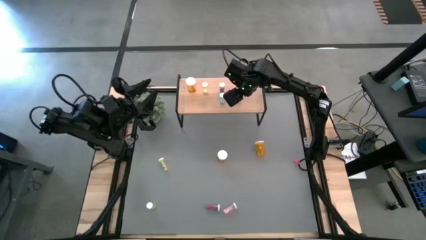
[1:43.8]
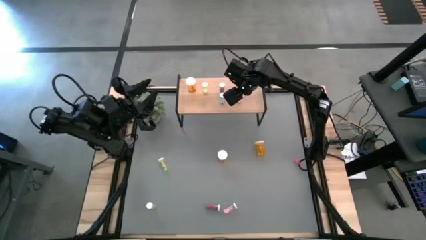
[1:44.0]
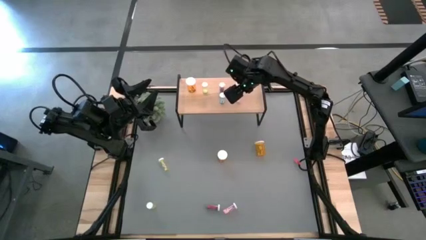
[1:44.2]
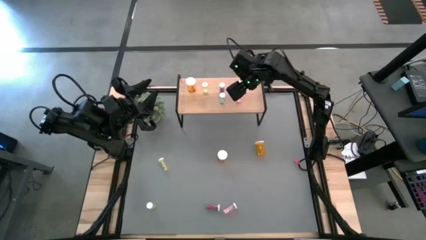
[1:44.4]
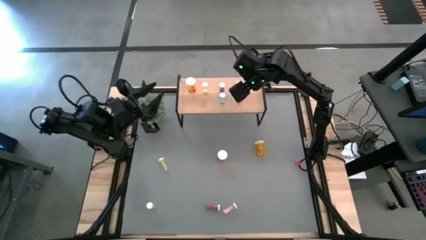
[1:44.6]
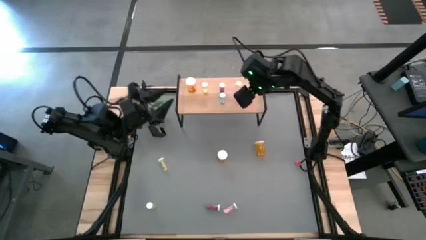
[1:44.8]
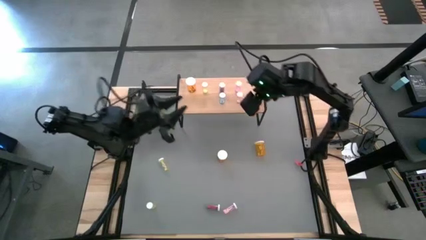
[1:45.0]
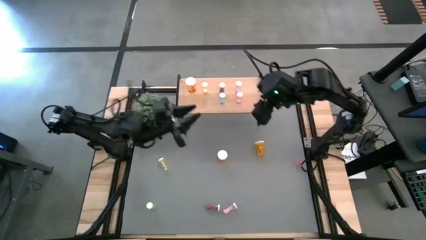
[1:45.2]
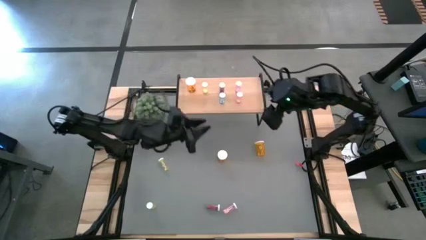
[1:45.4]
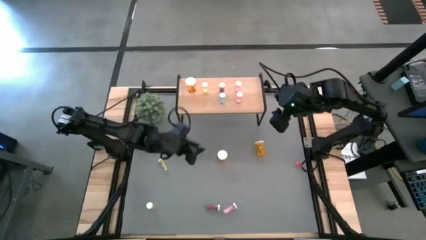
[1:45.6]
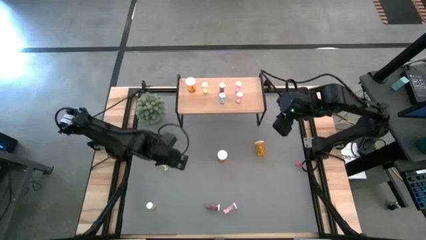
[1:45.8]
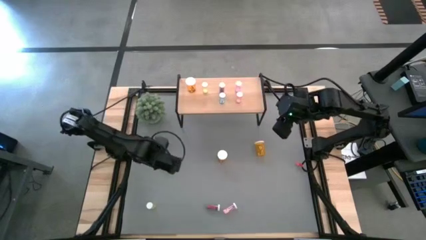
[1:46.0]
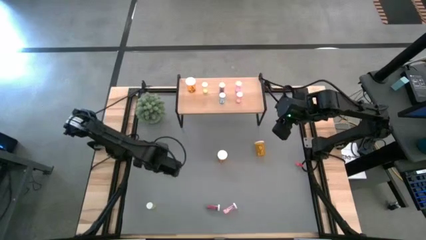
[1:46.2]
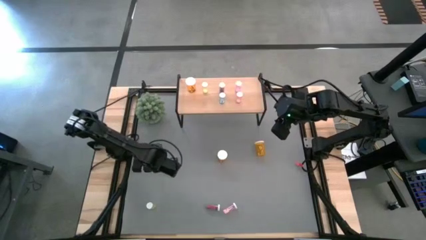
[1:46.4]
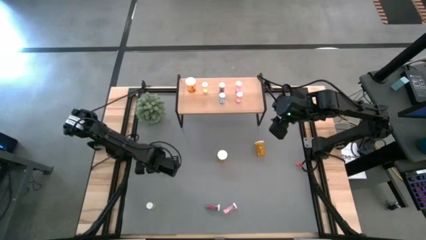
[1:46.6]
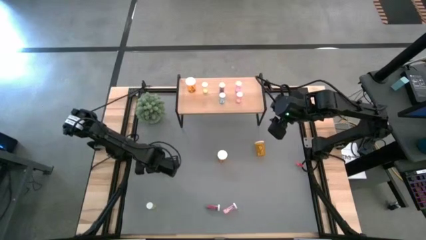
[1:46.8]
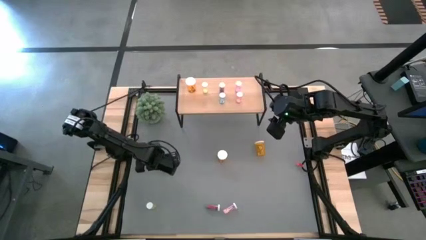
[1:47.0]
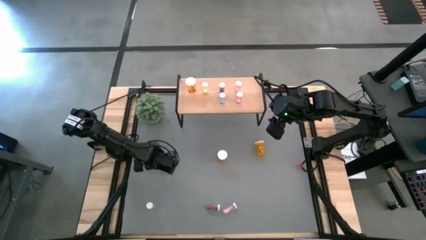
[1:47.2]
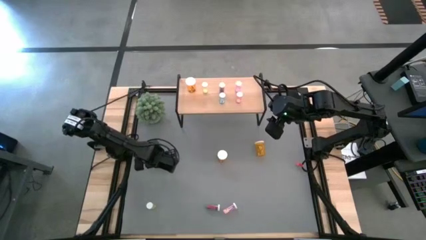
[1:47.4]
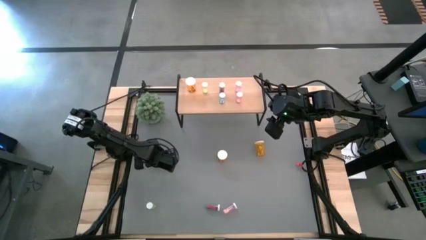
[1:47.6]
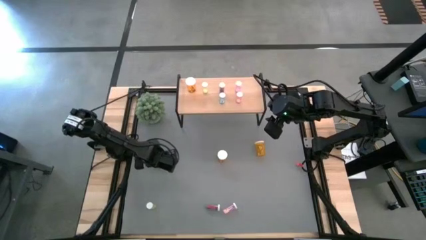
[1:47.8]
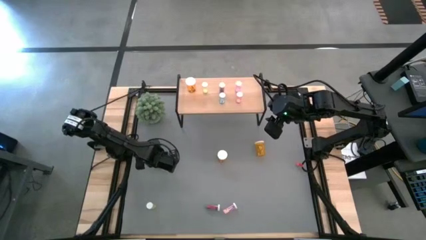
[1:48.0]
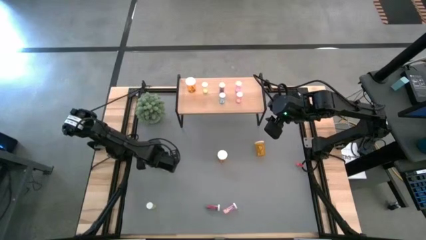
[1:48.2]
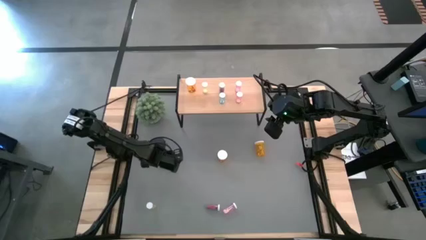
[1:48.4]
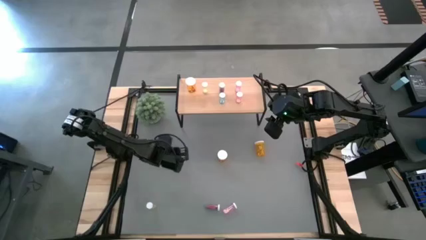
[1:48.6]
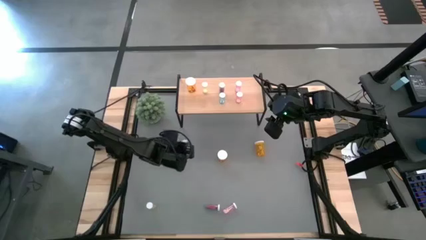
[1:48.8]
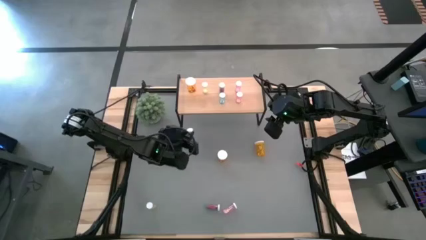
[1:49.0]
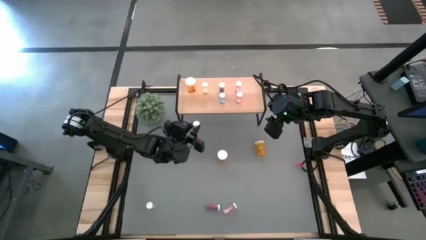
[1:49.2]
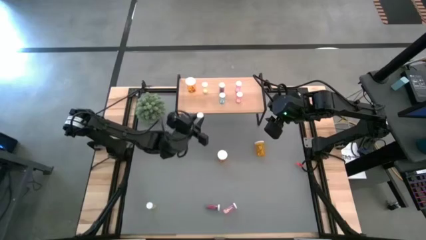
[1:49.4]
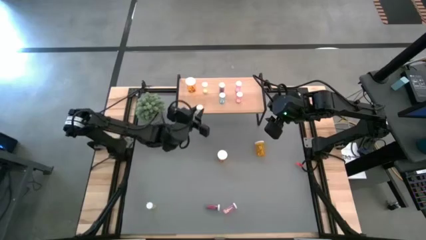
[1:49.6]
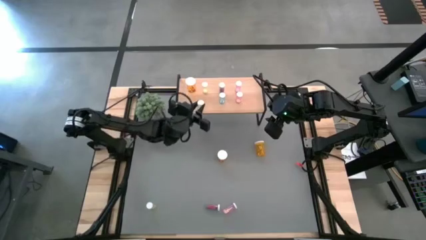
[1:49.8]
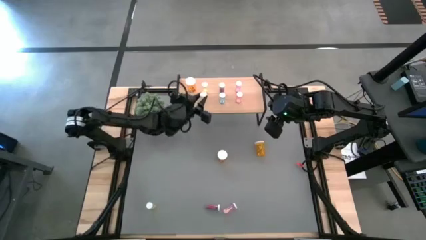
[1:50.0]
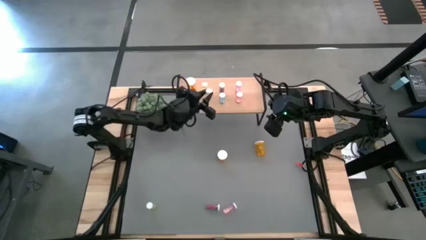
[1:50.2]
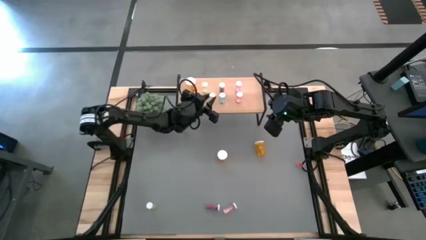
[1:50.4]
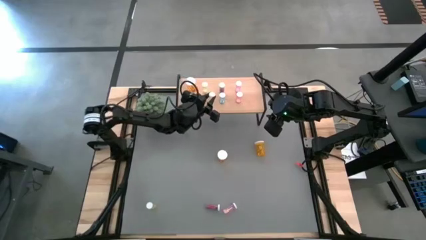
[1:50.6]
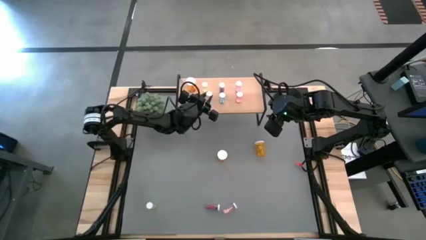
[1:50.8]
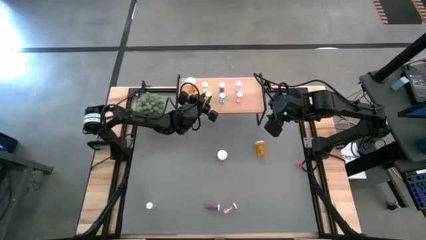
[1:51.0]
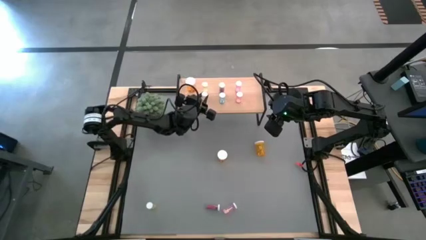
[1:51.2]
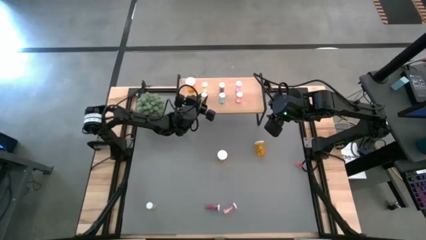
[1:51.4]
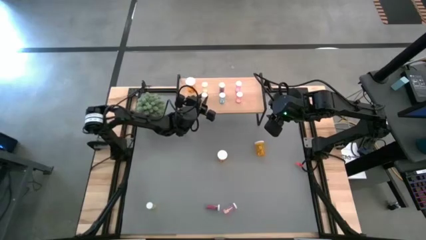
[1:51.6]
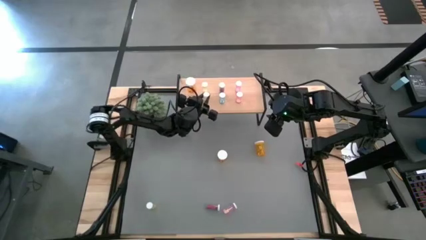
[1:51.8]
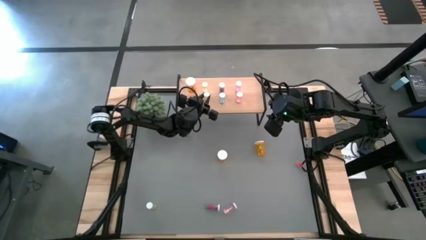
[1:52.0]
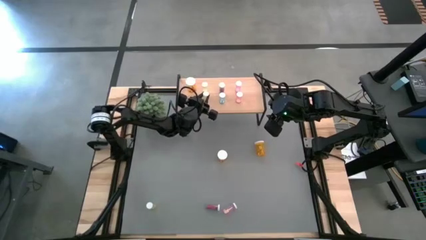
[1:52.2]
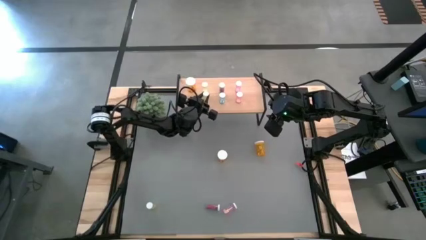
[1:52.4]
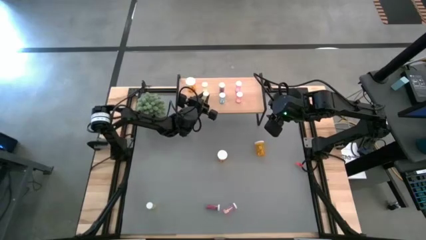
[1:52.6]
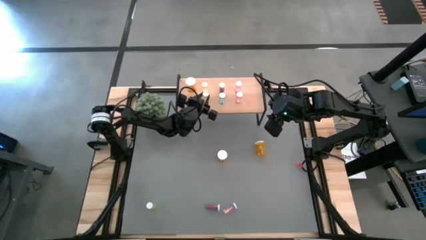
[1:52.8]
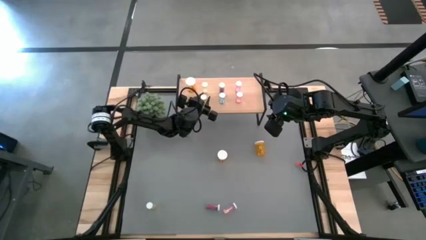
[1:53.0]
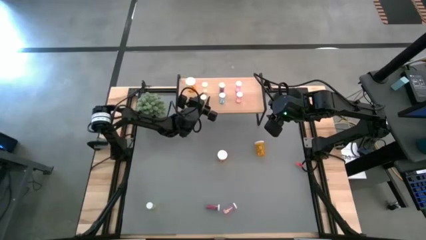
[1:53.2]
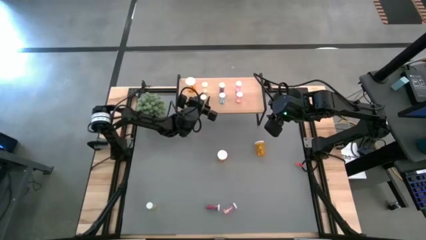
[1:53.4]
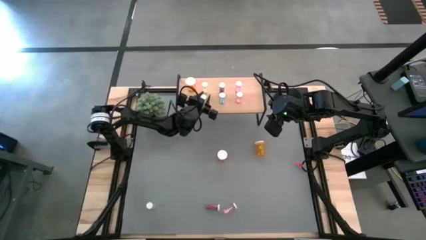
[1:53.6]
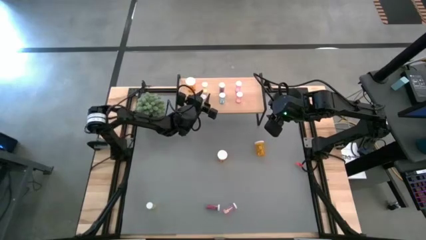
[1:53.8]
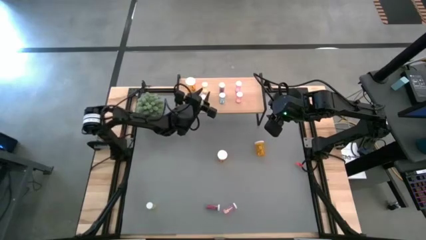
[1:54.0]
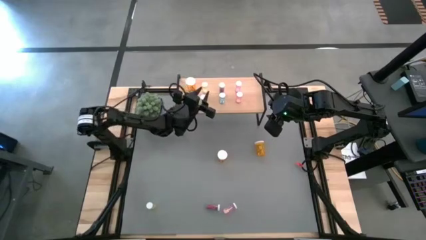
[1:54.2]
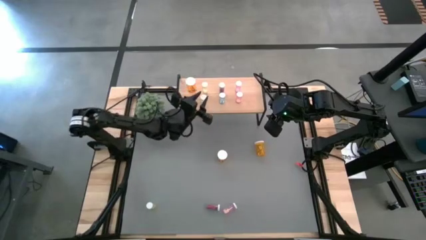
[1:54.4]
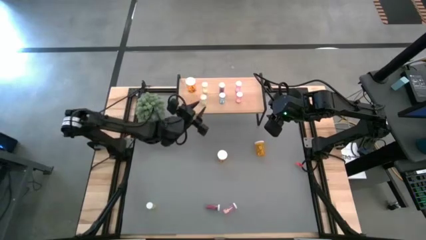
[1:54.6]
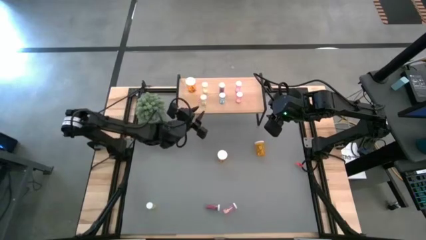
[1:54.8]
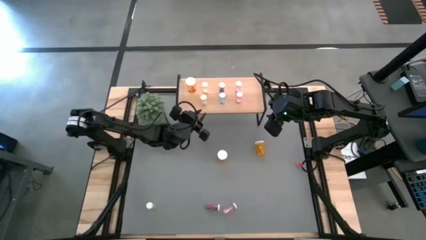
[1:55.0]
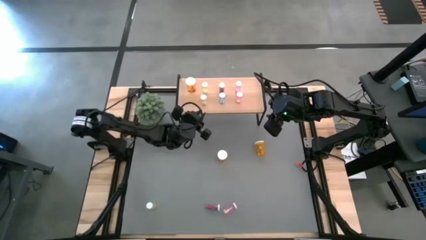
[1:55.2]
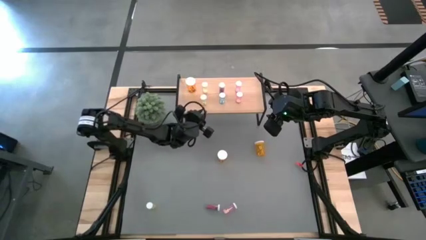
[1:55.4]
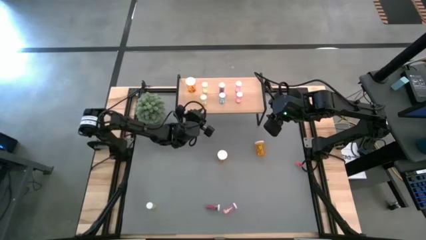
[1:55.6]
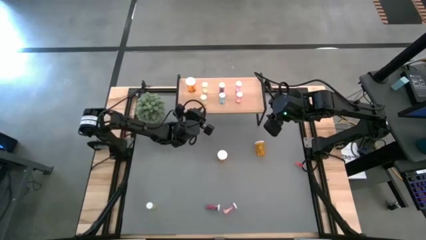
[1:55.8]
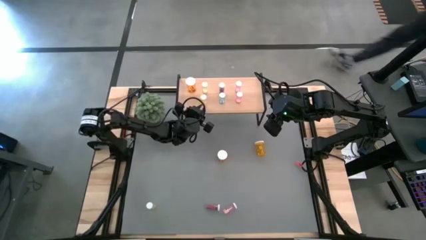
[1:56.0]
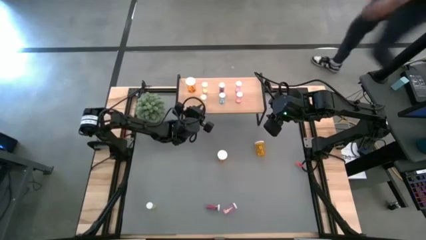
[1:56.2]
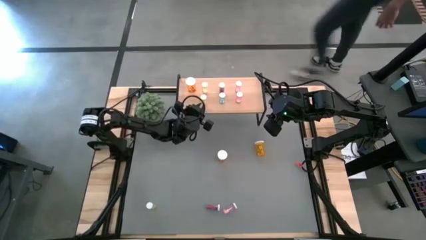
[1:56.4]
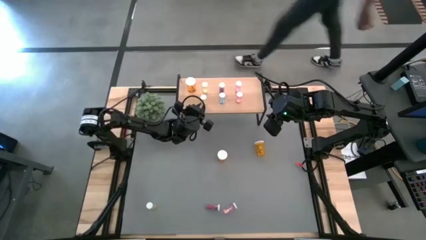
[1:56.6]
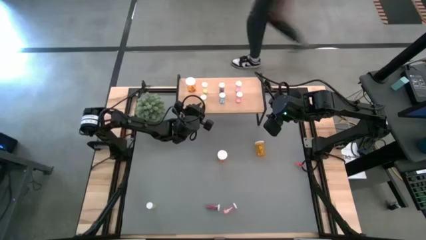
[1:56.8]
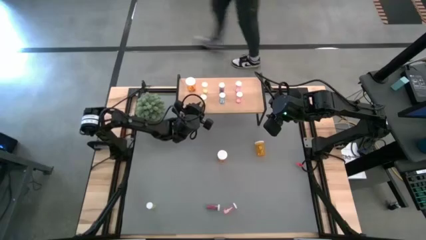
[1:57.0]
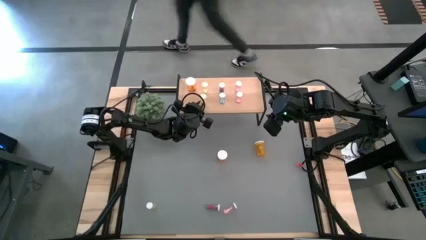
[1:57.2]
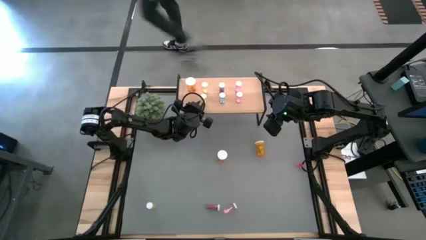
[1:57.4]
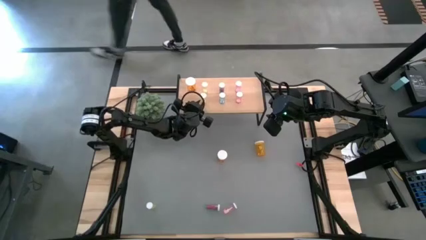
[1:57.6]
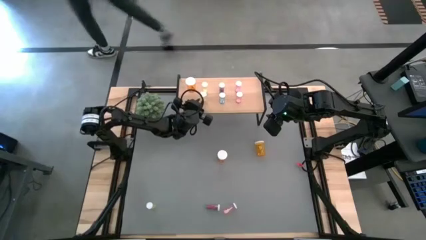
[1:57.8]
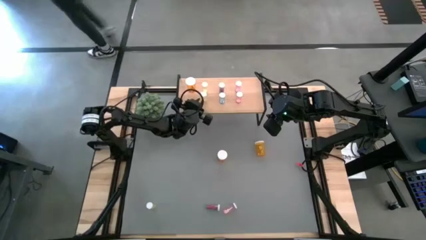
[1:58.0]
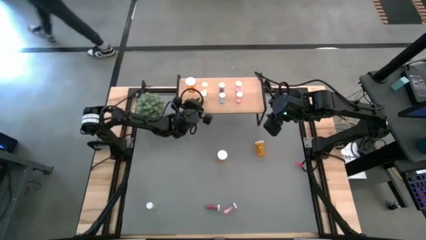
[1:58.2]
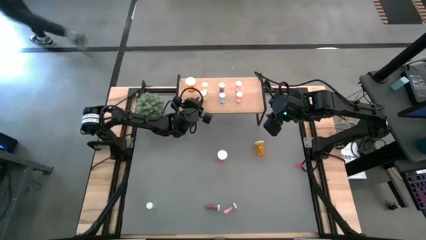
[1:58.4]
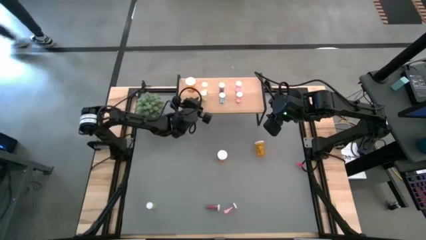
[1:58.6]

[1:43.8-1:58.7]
Task: Pick and place medicine bottles onto shelf by color
Put the top yellow pill bottle on the shelf aligned with the other yellow pill bottle
